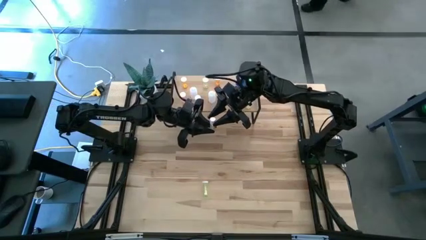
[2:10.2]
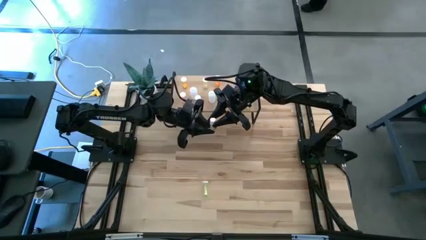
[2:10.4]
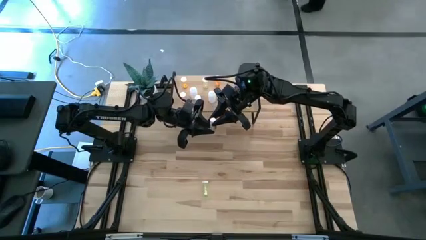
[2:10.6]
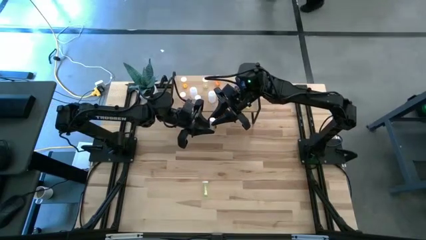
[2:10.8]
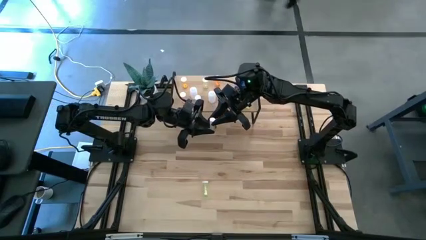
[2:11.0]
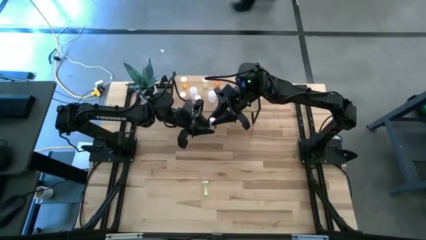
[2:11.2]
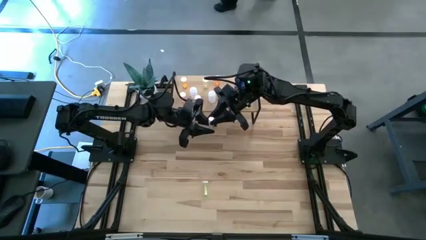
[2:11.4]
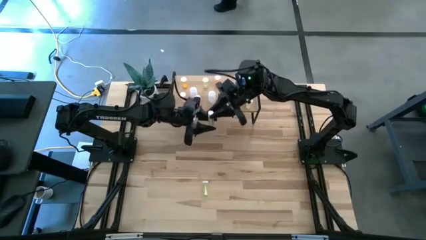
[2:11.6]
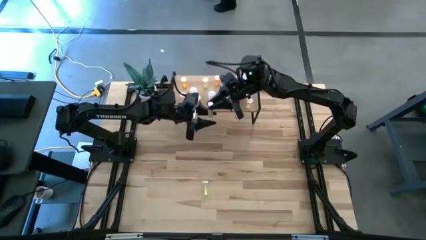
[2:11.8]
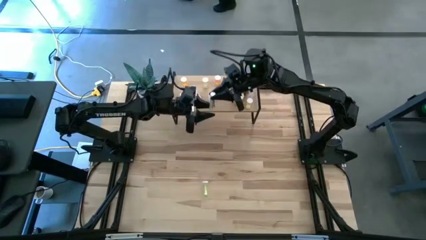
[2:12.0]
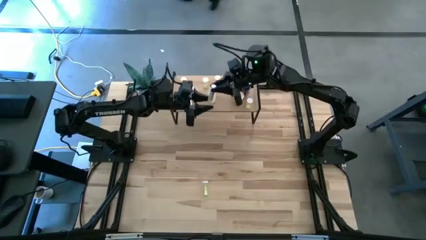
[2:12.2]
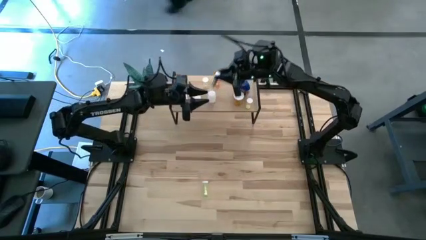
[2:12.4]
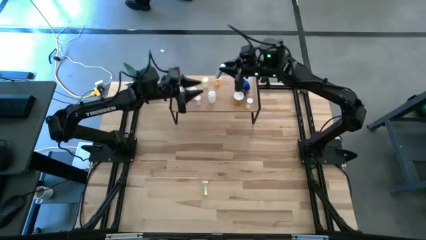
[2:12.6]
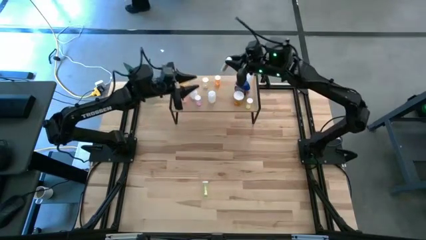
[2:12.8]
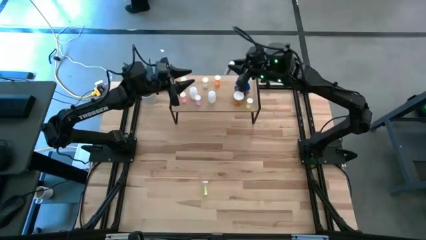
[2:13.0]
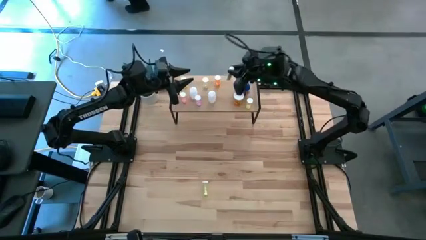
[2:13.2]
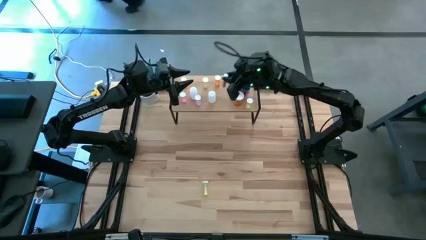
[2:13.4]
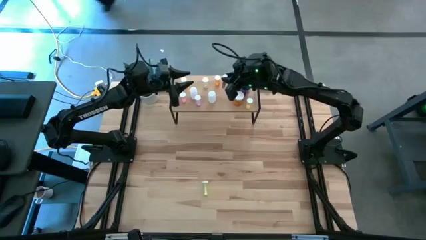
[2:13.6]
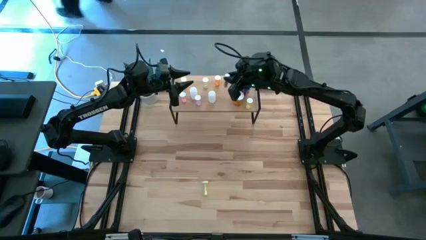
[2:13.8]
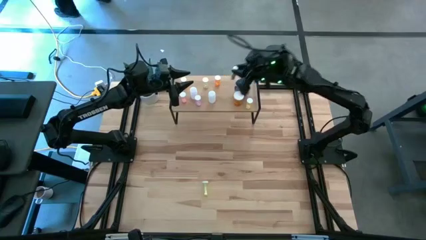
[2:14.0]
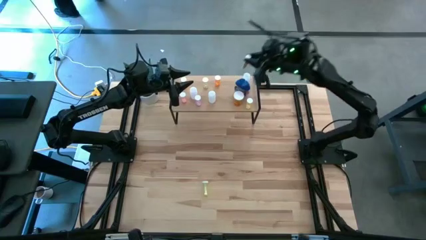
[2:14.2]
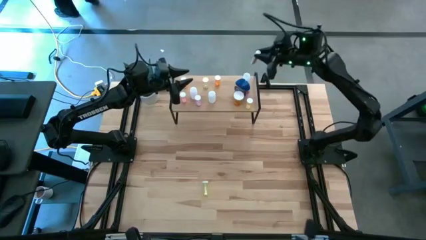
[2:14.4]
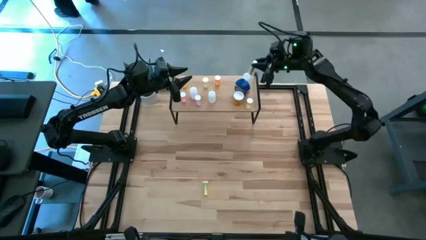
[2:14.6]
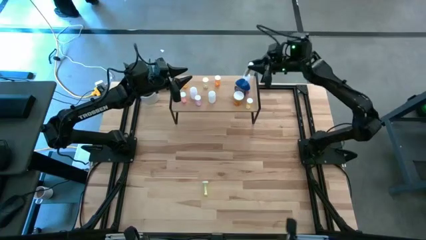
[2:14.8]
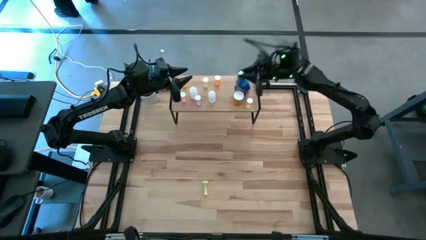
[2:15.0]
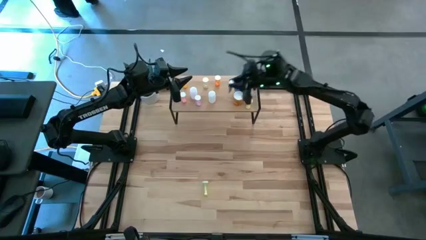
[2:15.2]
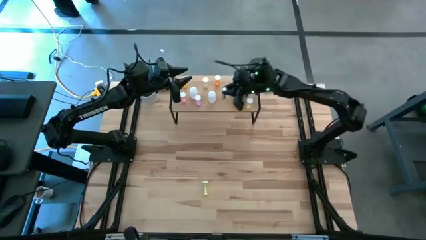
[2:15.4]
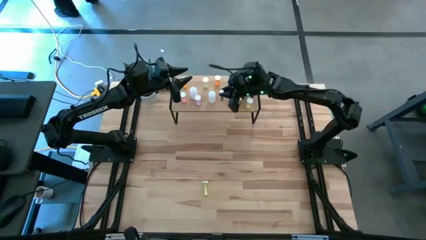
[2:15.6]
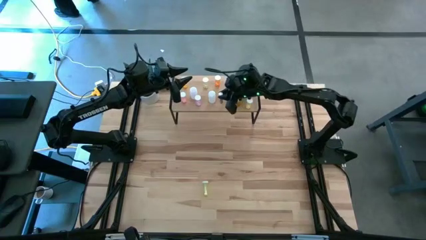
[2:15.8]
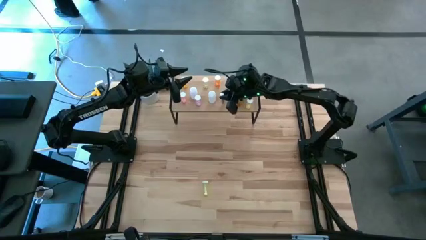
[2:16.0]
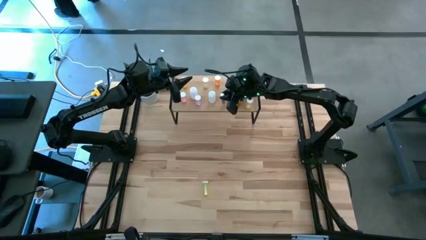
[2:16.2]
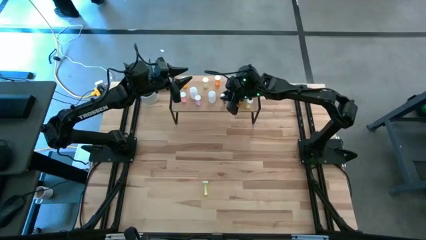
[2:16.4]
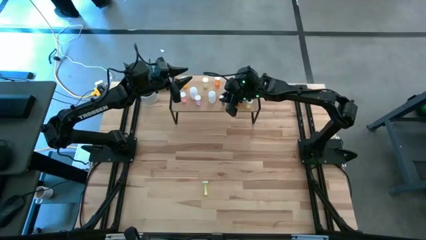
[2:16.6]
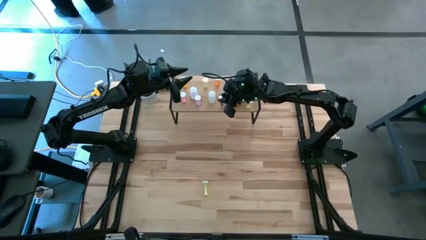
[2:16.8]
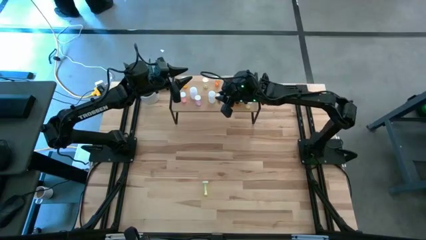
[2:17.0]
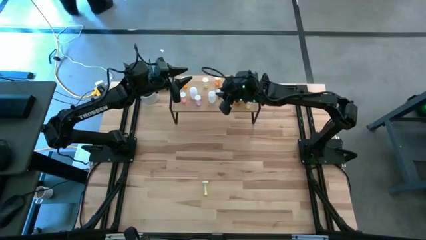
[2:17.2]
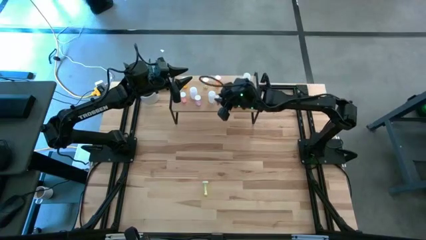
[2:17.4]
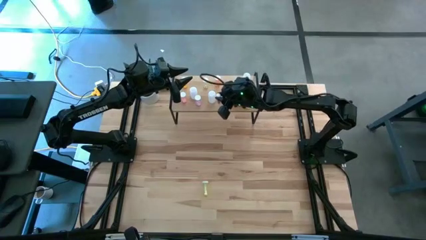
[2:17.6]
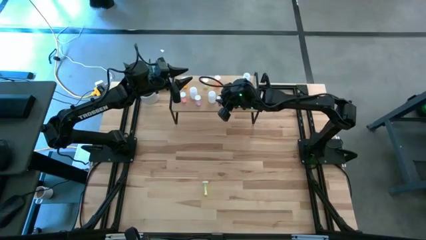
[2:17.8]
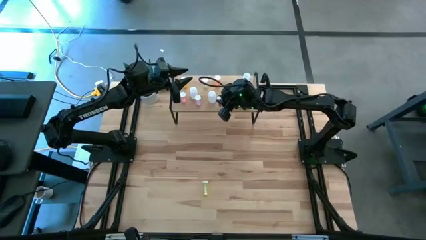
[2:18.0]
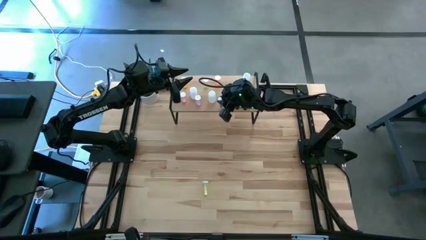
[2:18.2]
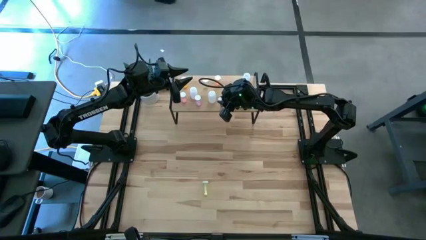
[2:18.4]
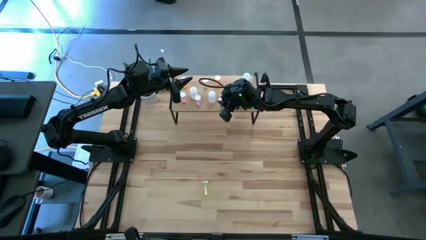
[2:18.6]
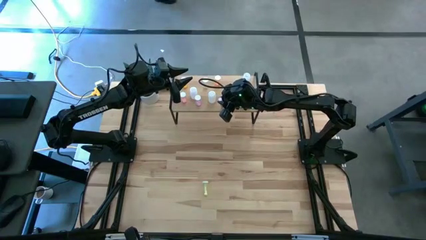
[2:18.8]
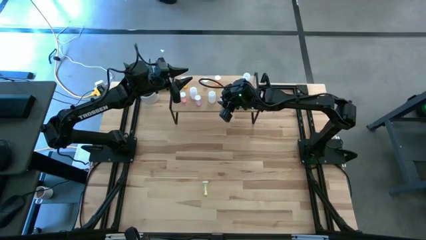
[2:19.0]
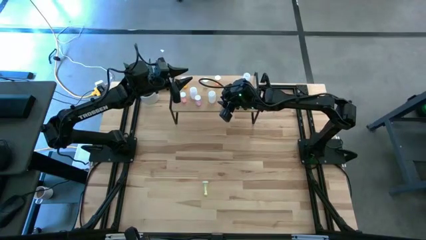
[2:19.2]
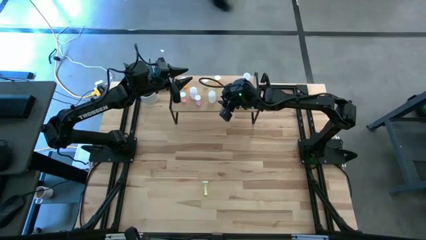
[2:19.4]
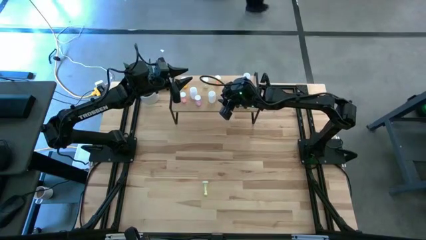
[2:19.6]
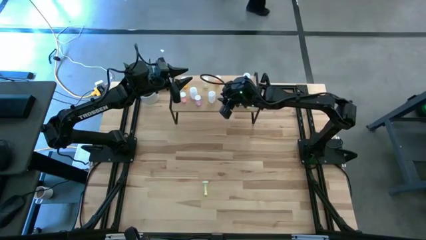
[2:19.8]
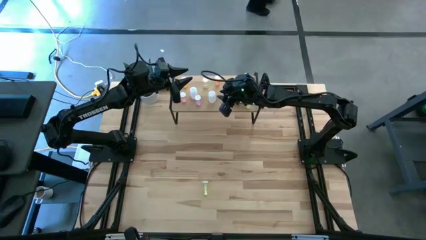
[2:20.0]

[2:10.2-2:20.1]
Task: Pick and place medicine bottles onto shelf by color
Put the white yellow pill bottle on the shelf

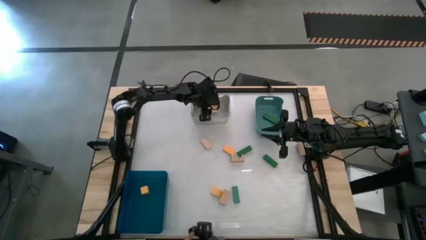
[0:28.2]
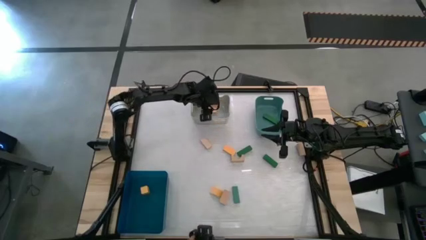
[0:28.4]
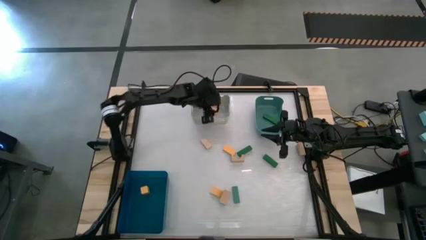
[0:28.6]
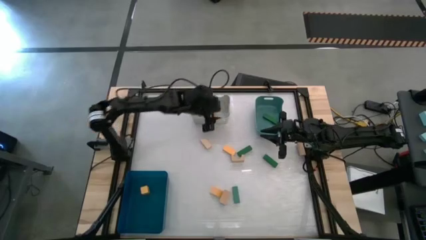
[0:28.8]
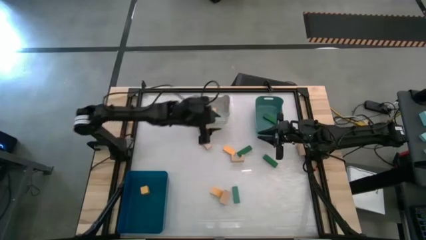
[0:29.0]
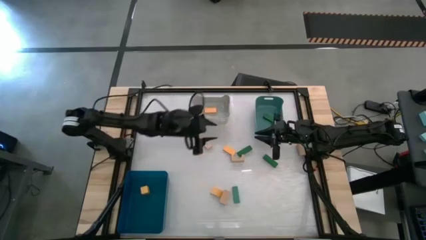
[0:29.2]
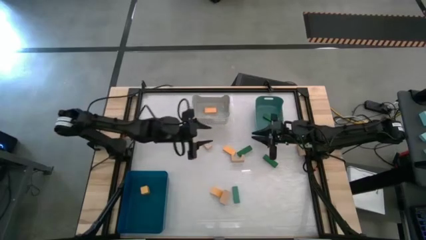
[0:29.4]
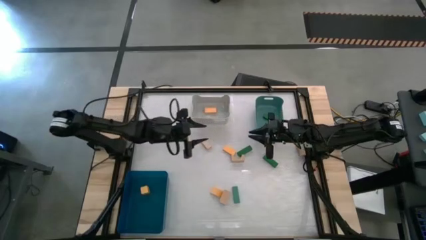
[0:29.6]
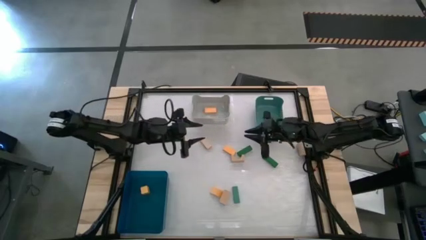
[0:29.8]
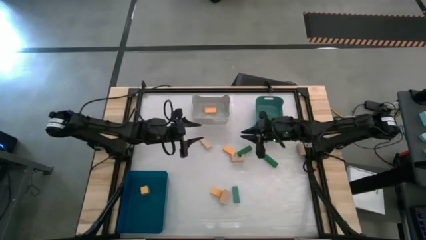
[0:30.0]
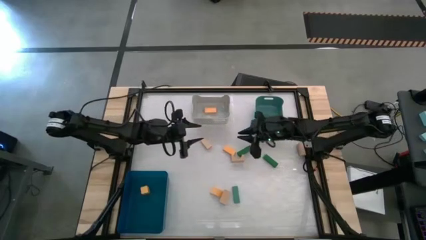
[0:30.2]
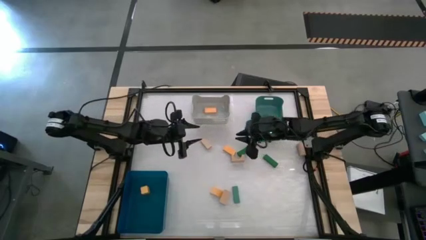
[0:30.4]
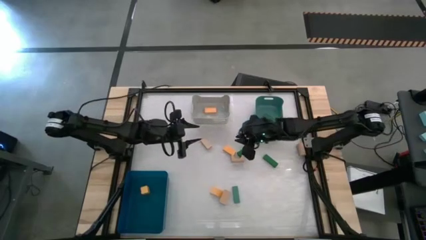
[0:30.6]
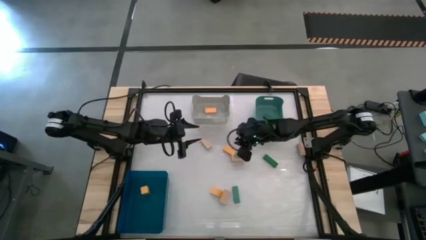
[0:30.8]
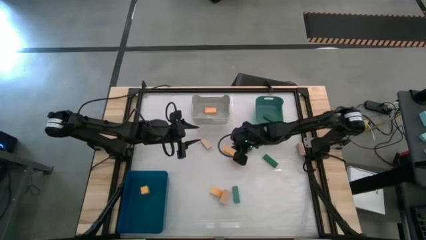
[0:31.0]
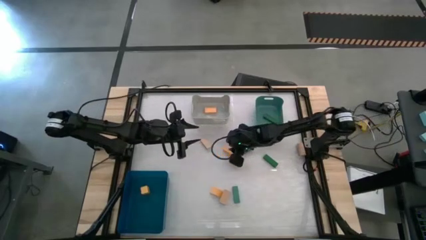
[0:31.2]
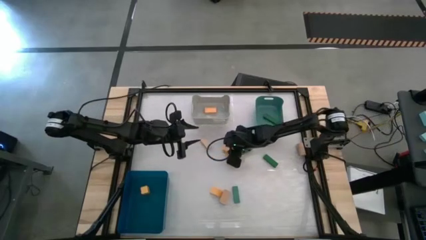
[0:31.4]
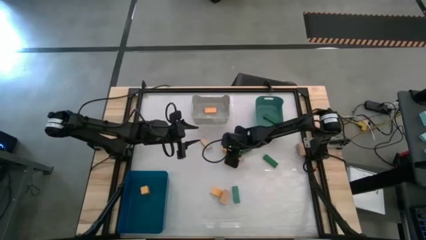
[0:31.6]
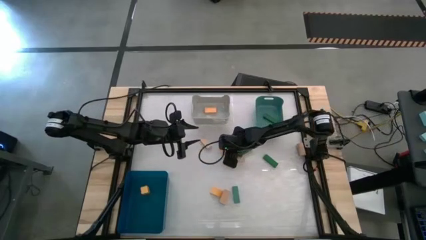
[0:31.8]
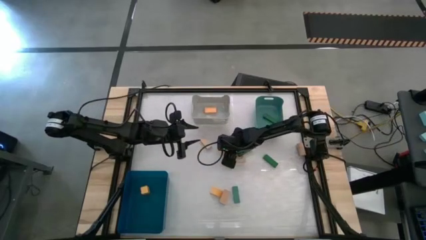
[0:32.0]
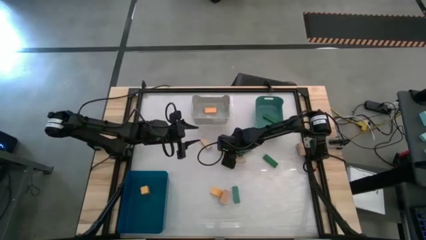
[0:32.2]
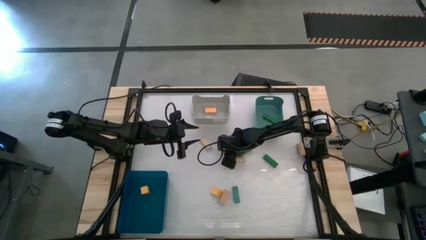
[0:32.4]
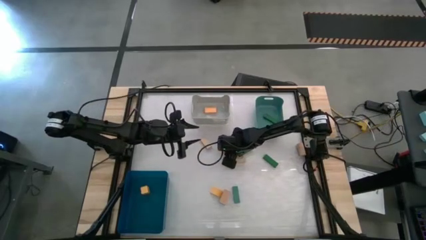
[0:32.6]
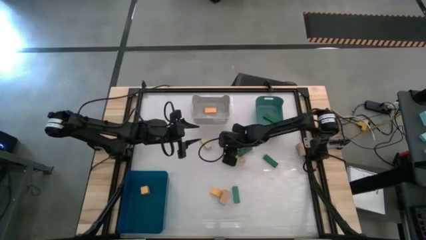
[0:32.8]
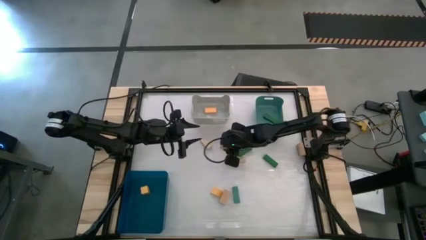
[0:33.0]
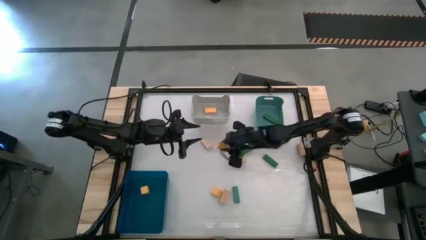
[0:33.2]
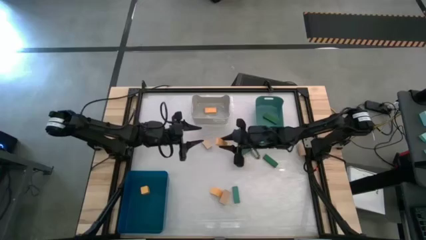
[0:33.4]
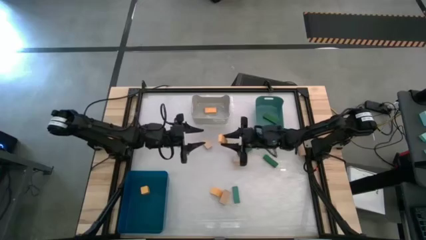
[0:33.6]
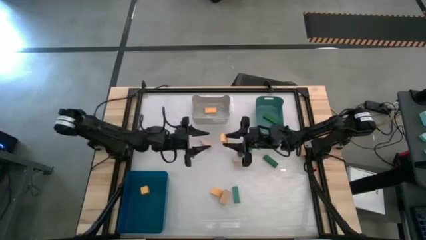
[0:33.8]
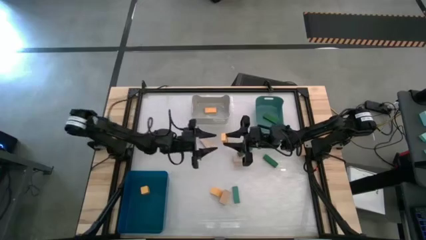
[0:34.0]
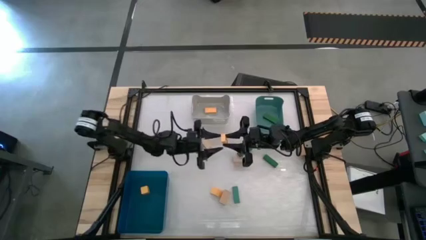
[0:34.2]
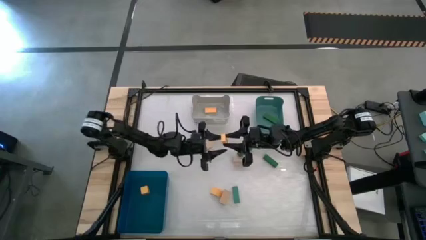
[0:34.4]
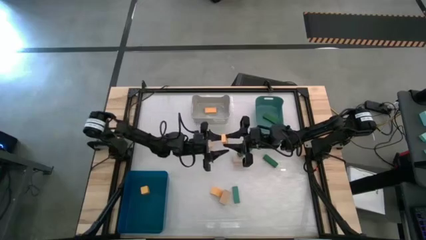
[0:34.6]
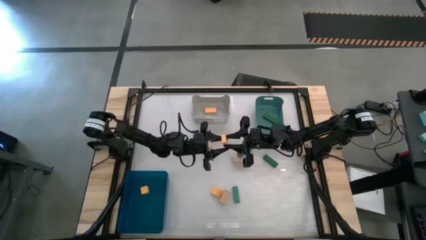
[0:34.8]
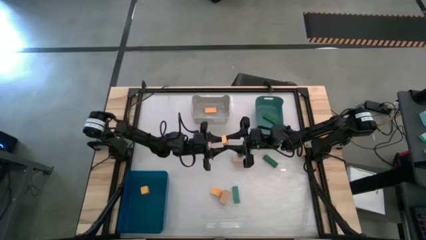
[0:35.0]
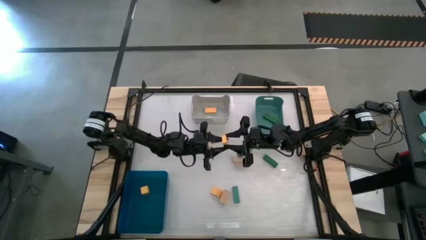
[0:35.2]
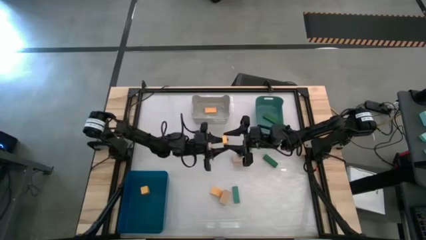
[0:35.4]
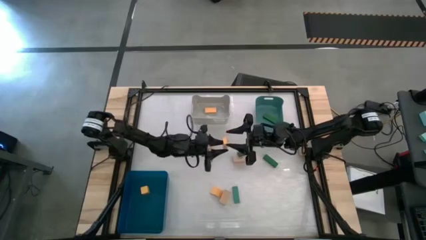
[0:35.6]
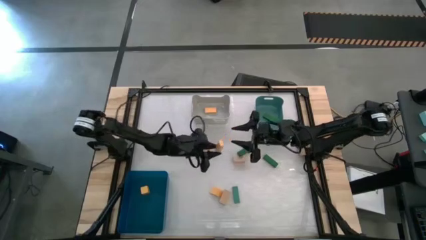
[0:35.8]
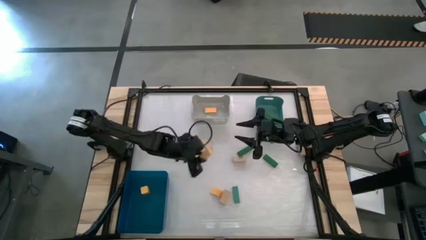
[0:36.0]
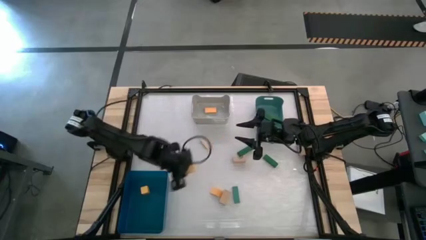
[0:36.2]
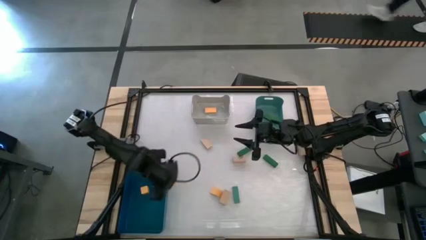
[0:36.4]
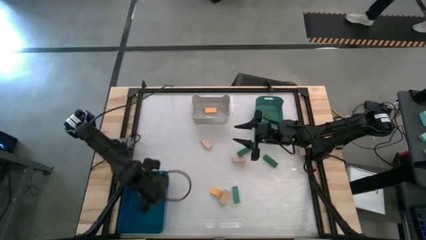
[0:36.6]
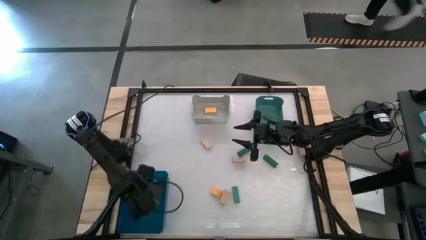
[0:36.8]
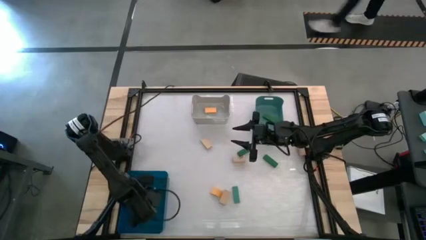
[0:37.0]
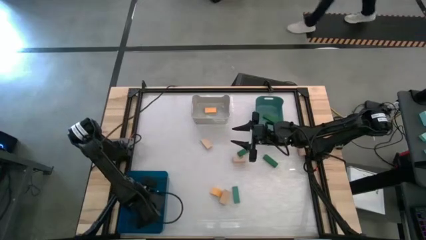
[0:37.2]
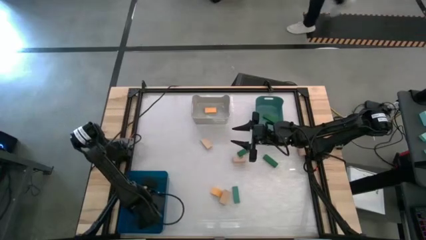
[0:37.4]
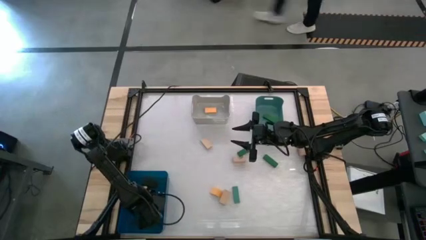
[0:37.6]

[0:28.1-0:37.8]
Task: Sort & place blocks by color
Put the yellow block into the blue bin
